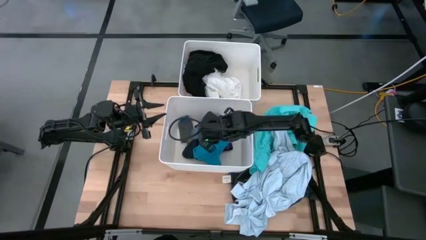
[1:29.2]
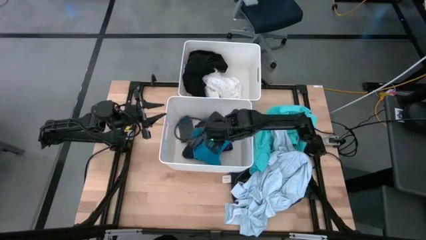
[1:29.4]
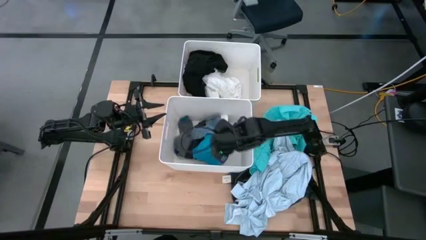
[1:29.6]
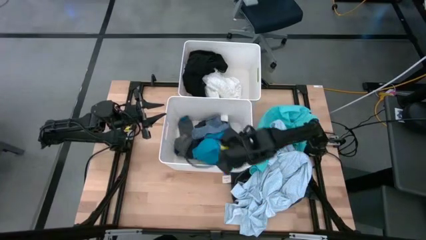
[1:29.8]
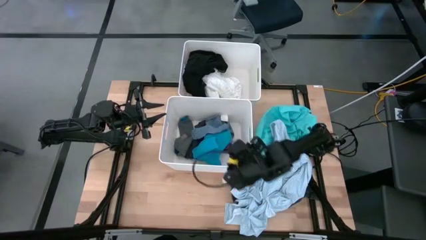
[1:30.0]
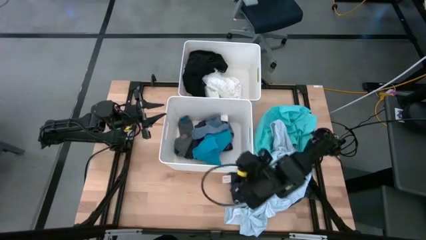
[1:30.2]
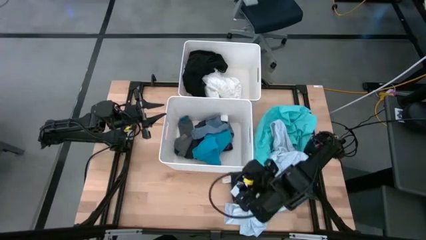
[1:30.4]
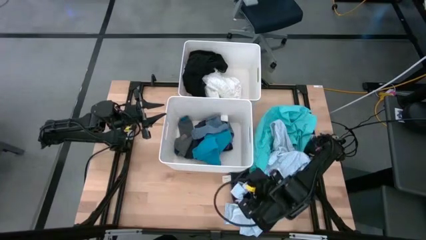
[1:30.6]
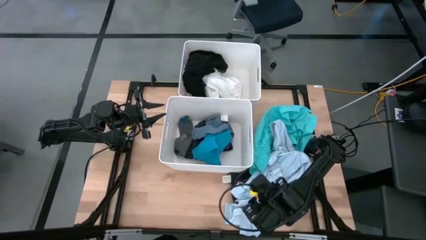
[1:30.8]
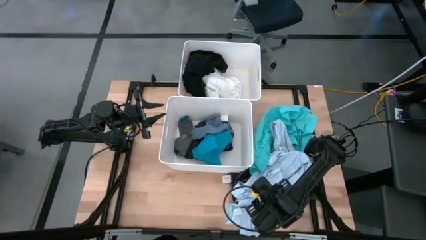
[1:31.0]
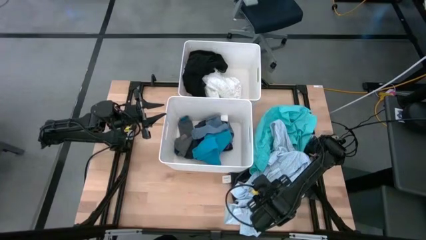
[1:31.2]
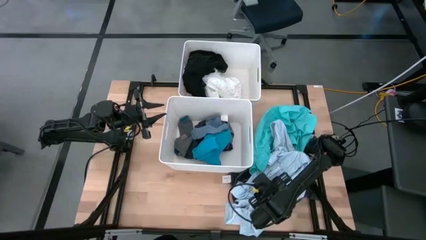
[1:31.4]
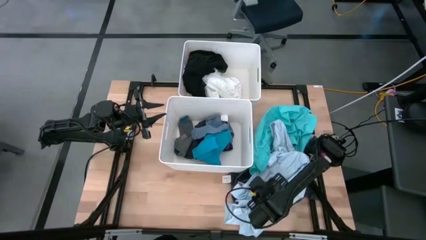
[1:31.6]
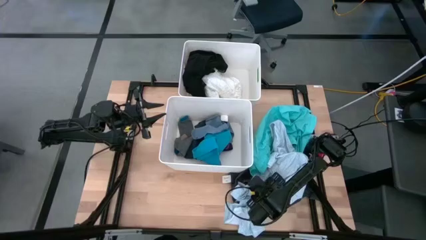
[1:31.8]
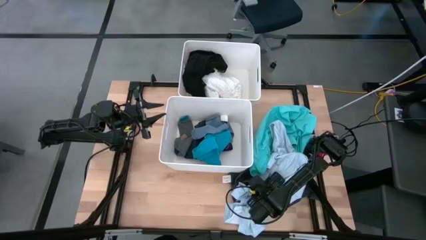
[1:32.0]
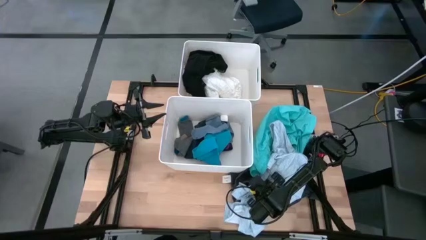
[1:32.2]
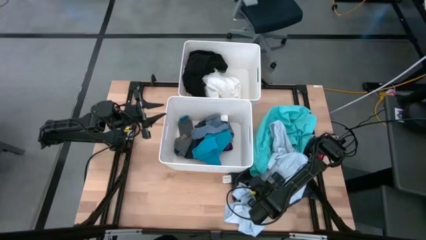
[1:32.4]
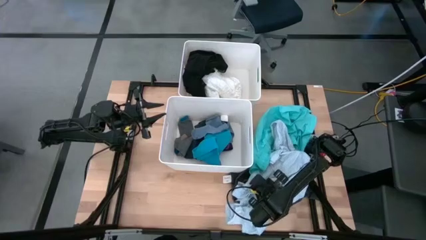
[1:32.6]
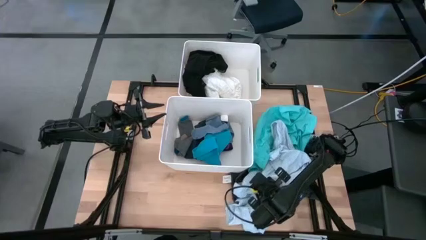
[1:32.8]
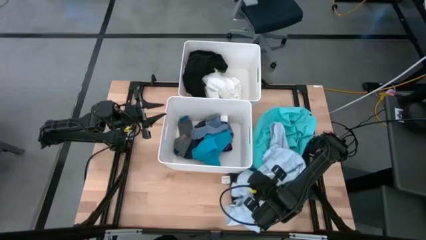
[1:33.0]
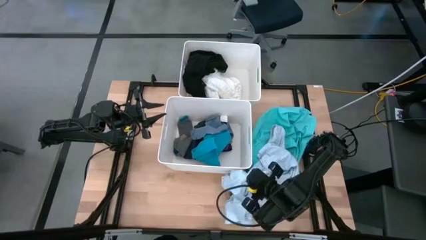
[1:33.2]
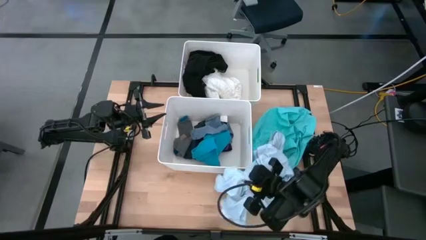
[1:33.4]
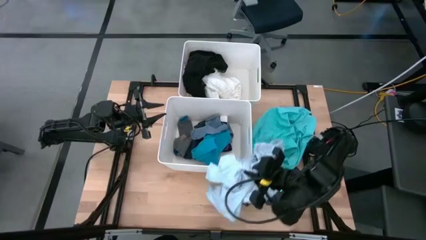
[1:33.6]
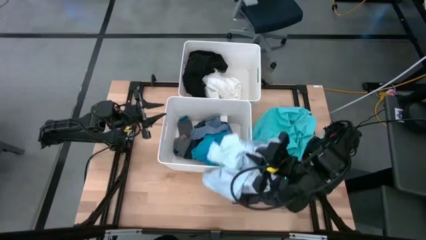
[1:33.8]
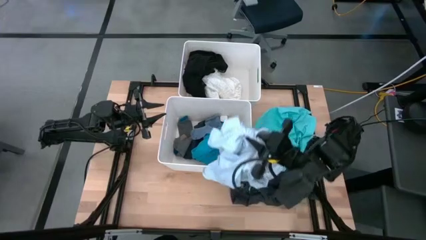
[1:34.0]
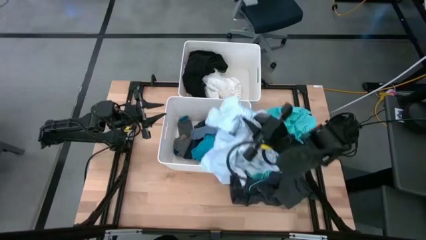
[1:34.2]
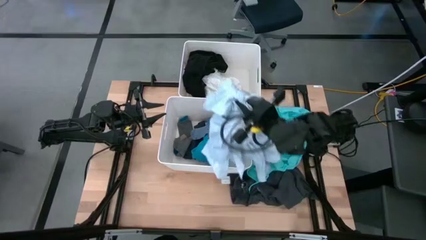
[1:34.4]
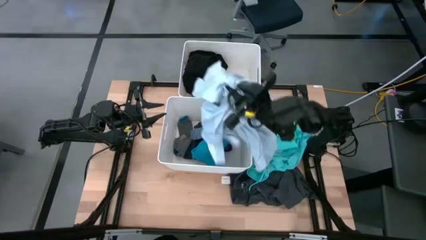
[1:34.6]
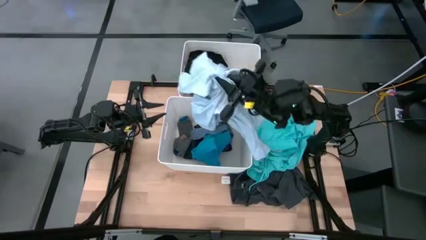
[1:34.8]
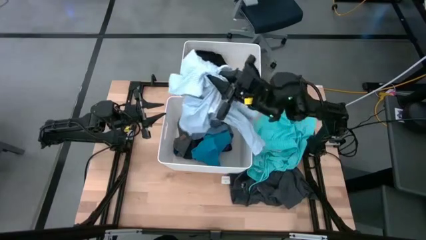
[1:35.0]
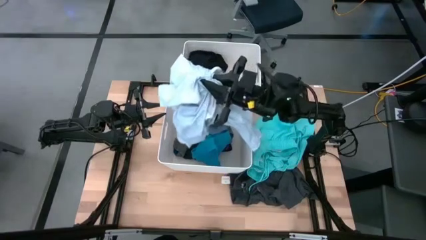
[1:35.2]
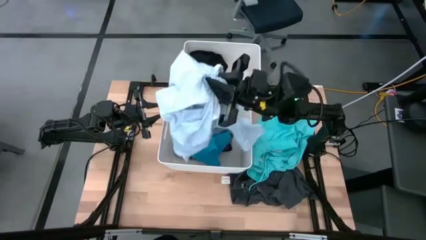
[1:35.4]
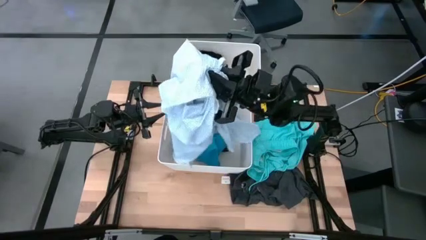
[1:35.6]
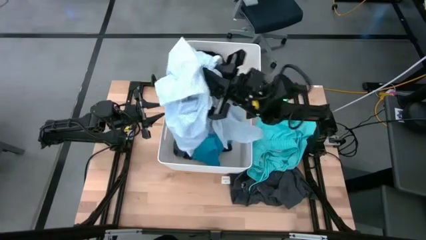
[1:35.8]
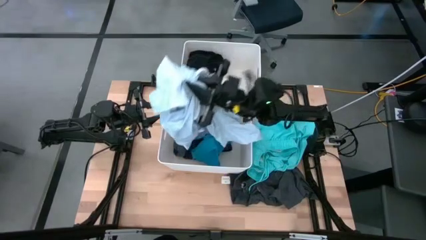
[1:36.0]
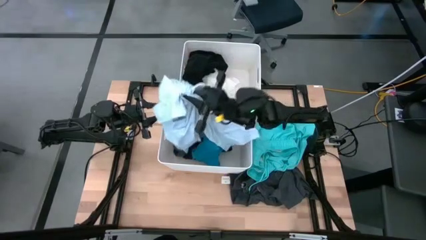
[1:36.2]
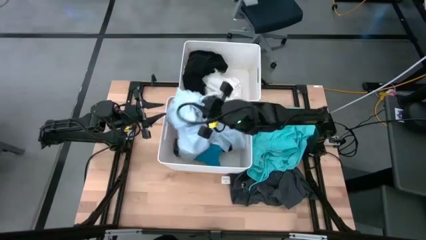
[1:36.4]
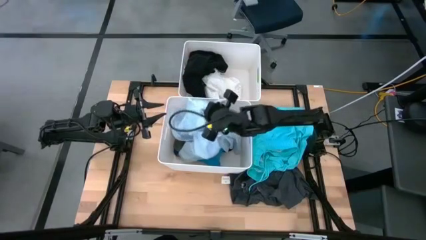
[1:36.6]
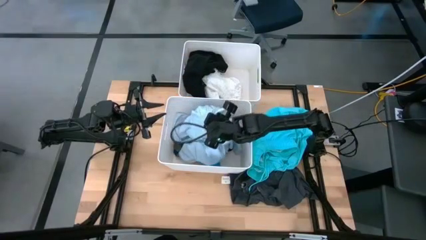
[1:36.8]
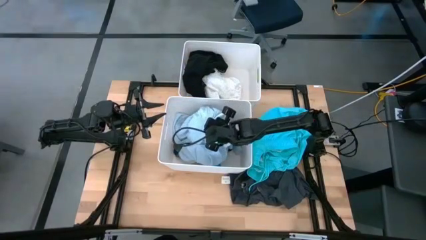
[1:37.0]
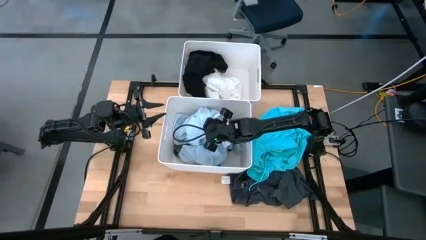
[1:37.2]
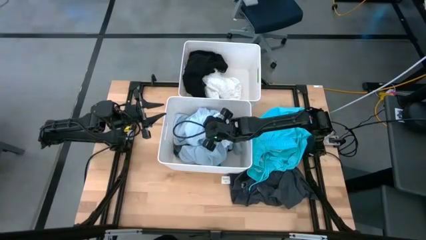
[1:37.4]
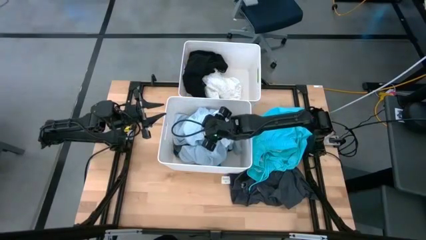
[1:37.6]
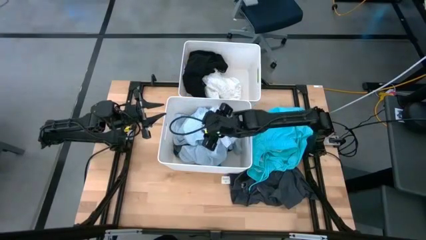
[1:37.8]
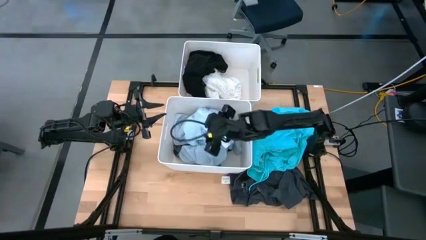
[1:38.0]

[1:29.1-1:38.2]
Task: Sort clothes
Put the white patterned shirt into the bottom white bin
